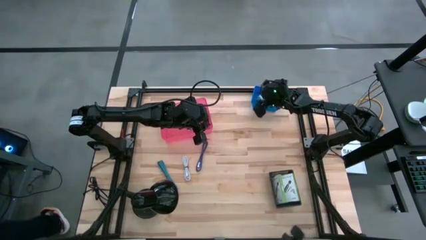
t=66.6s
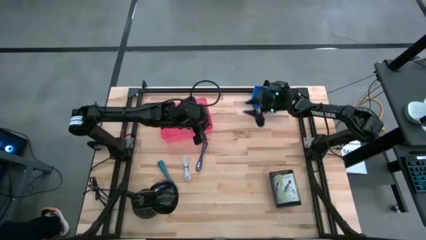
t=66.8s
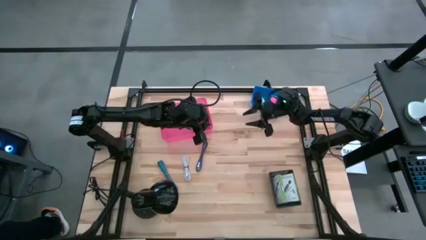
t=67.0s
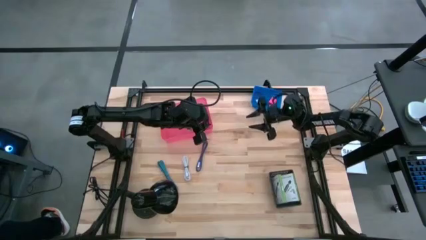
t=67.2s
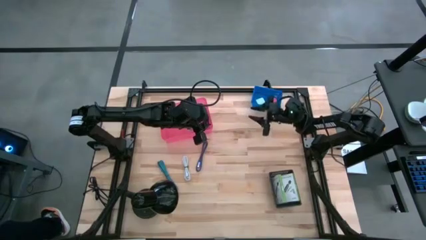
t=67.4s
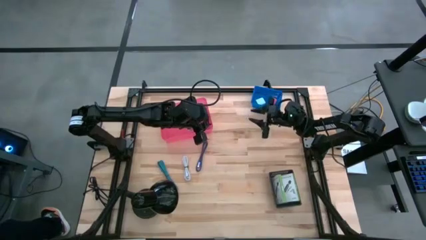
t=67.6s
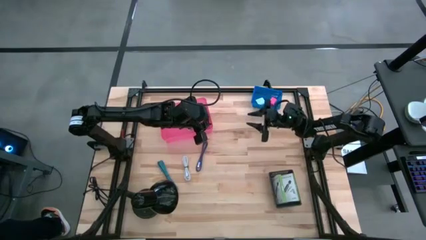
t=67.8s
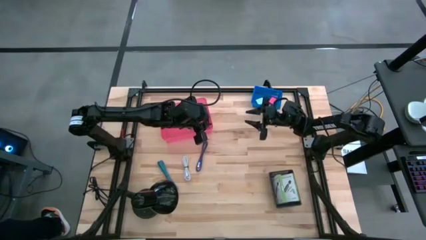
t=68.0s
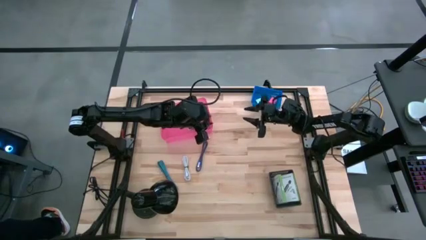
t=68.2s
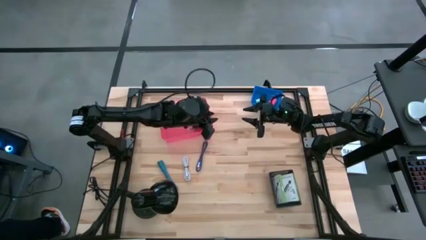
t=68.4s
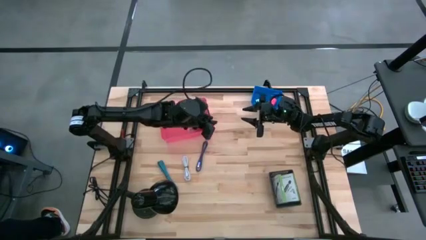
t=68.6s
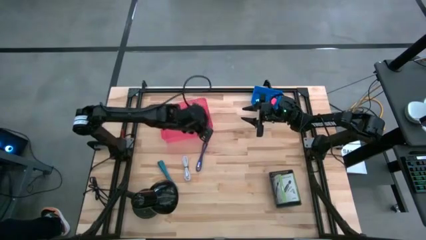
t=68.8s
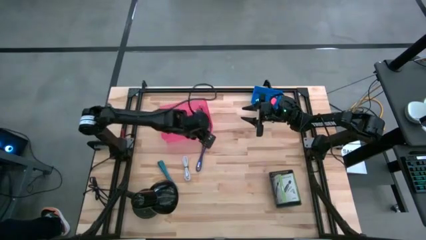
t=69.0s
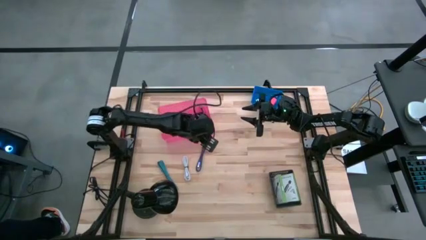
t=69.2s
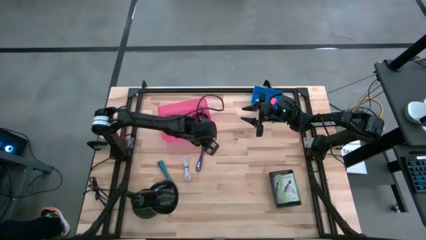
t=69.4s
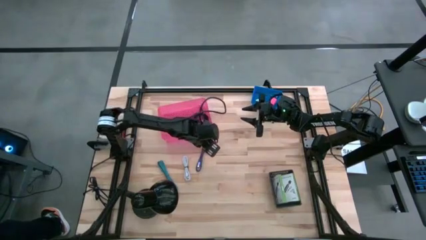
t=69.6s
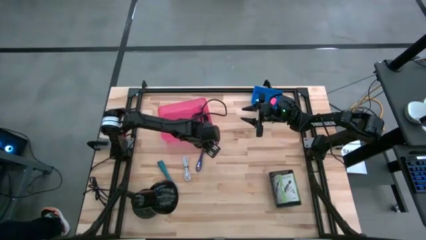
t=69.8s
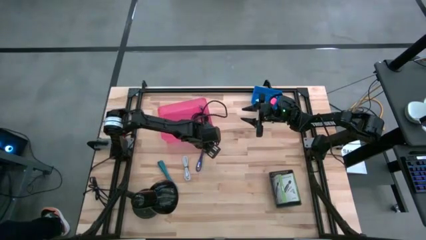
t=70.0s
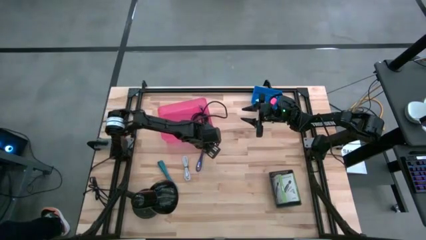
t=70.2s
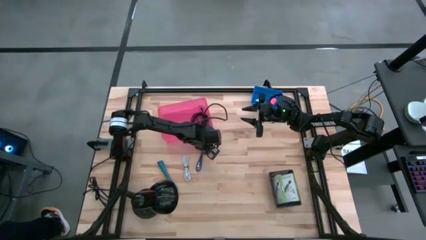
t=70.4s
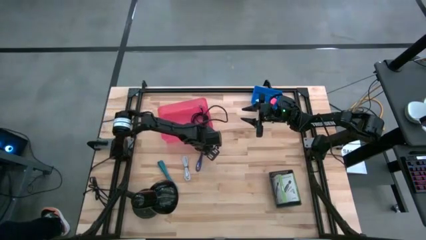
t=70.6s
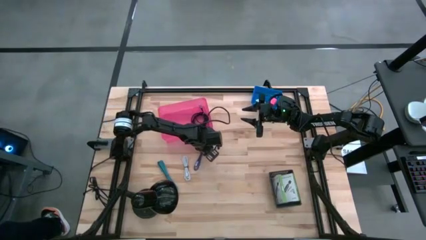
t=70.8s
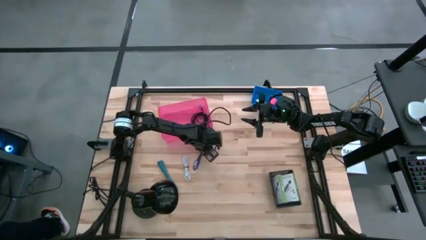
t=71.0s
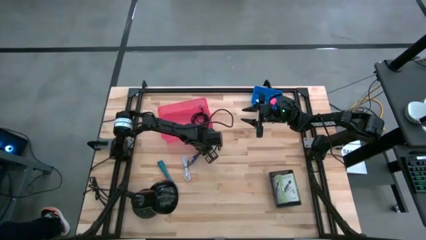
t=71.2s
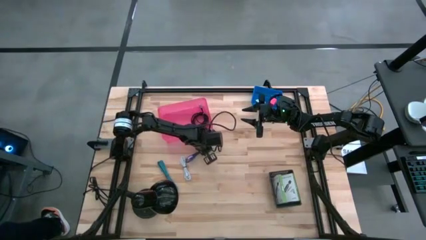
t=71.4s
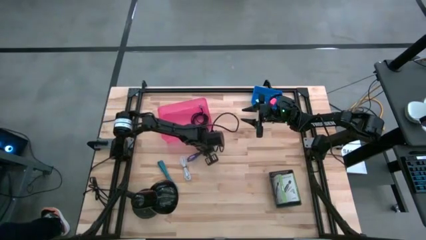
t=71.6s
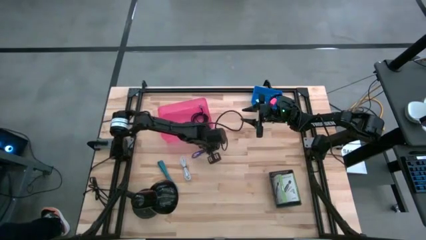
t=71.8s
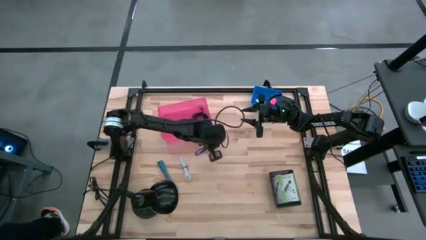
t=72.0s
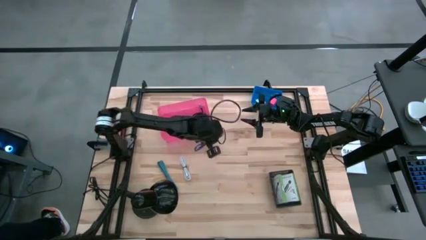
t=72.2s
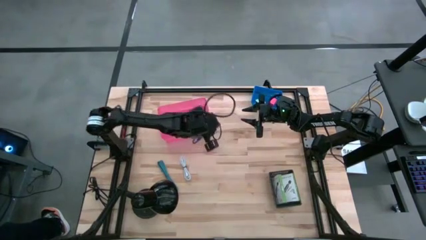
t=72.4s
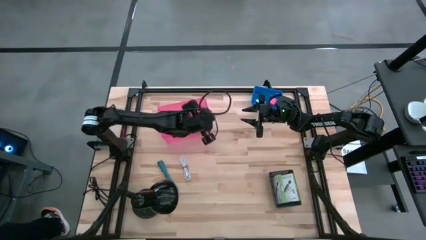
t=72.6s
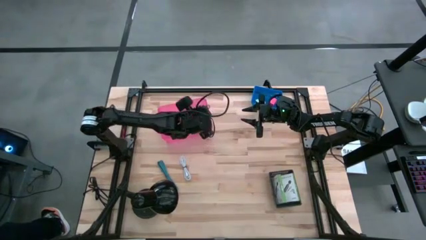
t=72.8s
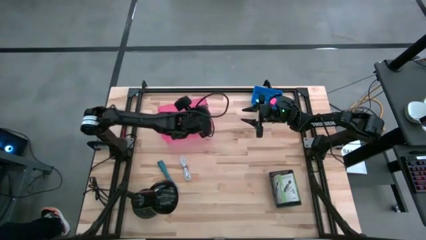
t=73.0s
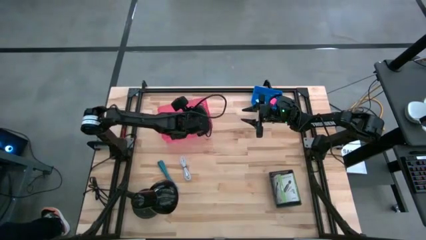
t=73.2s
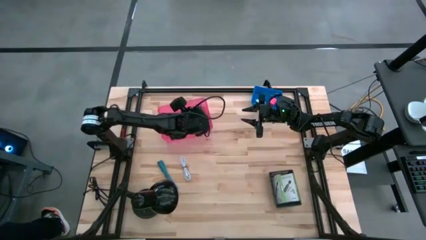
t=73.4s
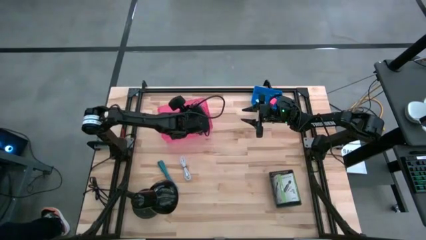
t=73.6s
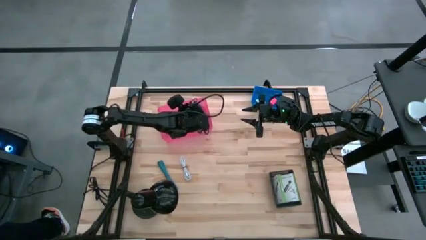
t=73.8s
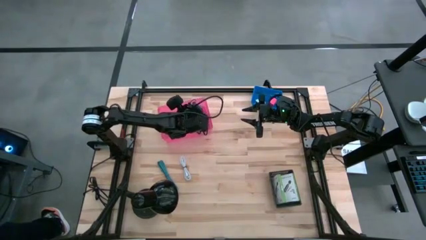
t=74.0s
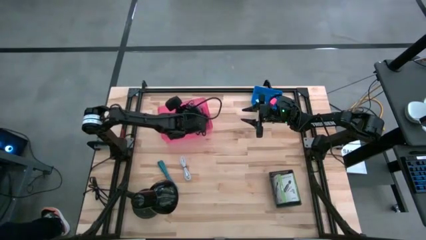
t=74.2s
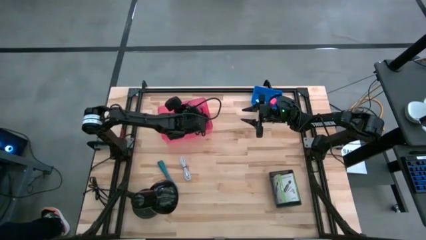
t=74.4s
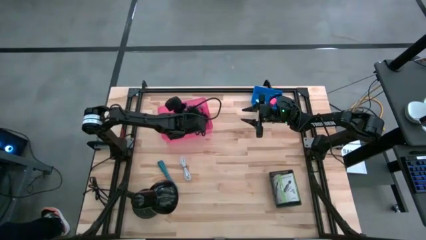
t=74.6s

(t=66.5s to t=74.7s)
Task: Pick and place items into bin
Put the violet cable wire into the pink bin

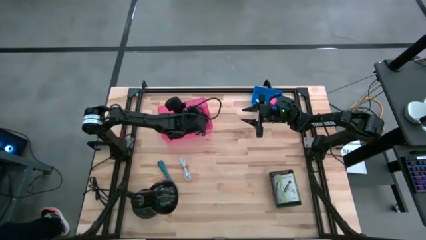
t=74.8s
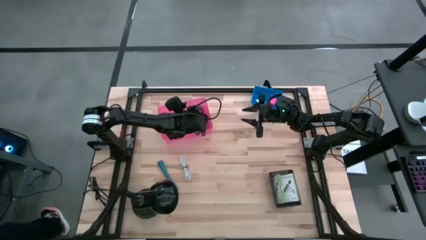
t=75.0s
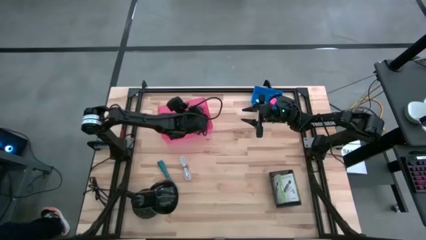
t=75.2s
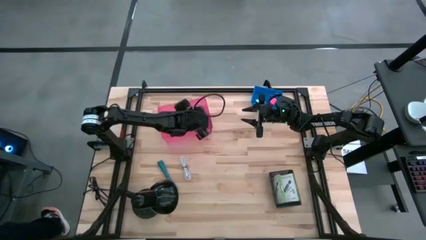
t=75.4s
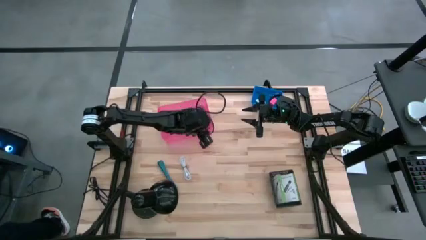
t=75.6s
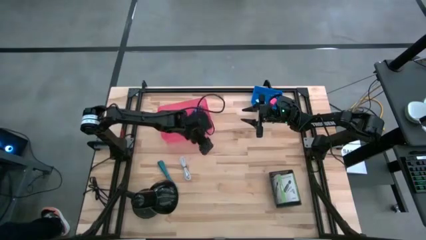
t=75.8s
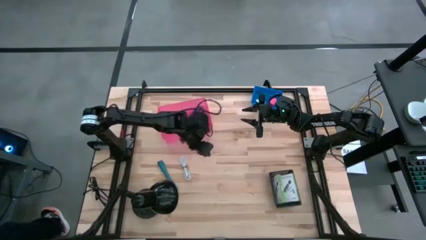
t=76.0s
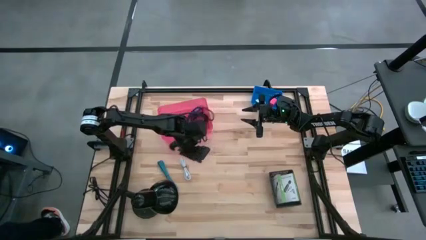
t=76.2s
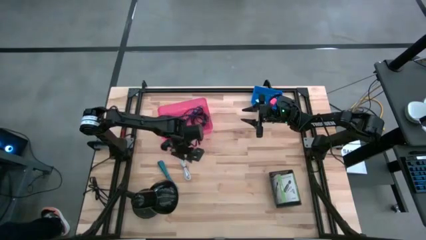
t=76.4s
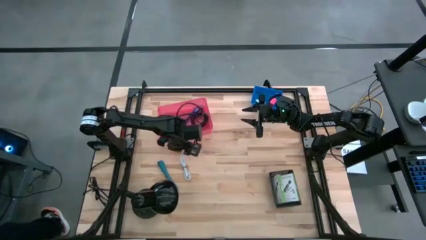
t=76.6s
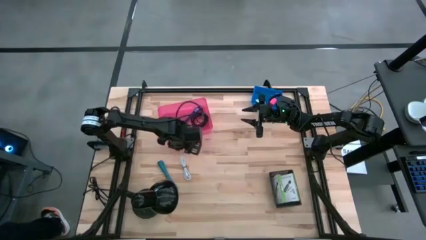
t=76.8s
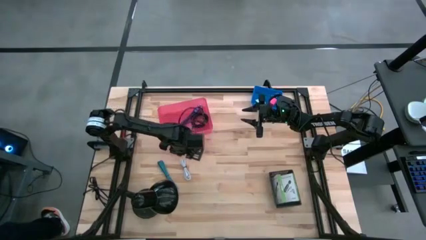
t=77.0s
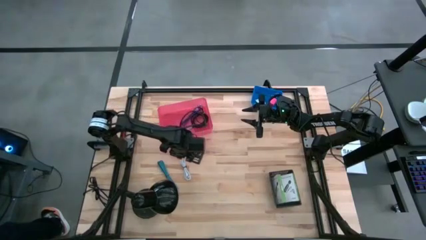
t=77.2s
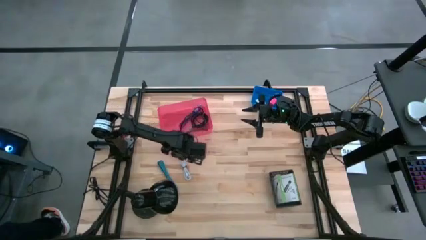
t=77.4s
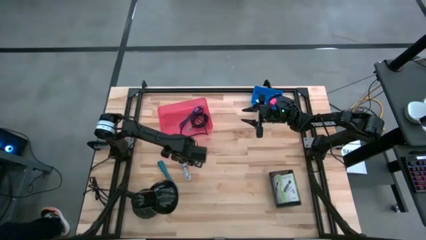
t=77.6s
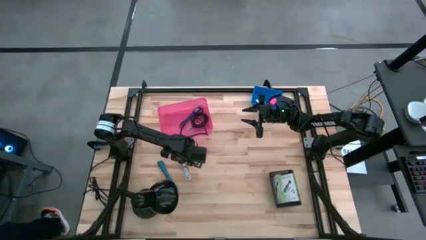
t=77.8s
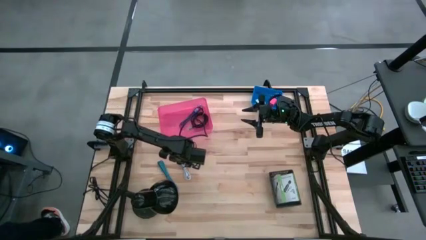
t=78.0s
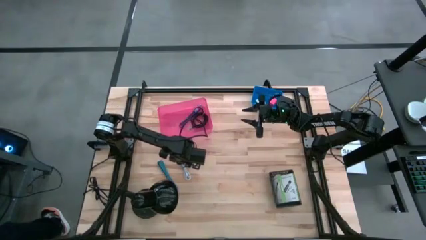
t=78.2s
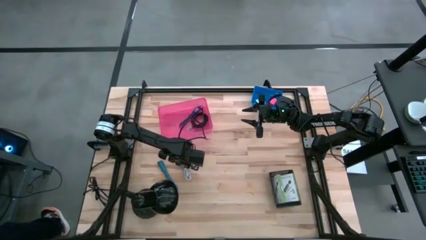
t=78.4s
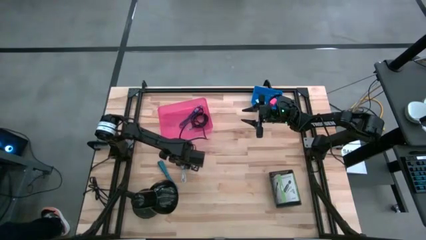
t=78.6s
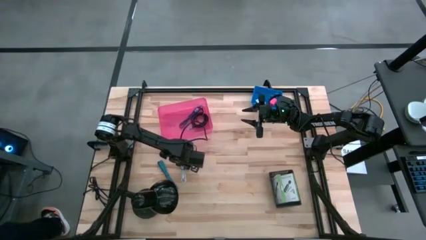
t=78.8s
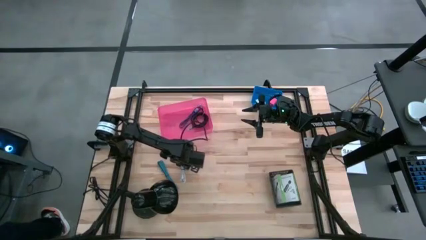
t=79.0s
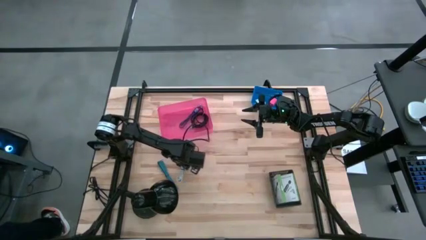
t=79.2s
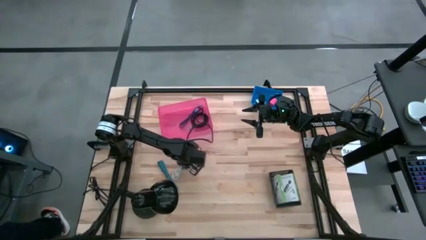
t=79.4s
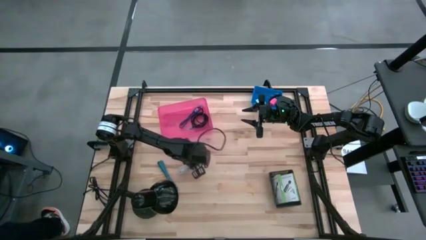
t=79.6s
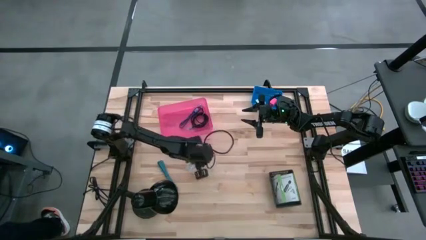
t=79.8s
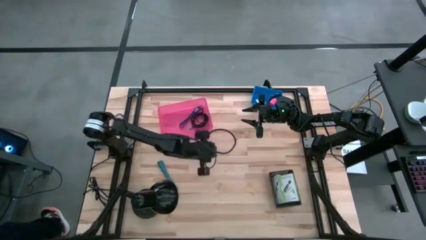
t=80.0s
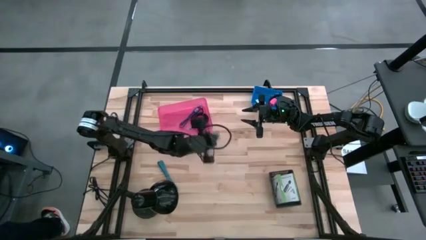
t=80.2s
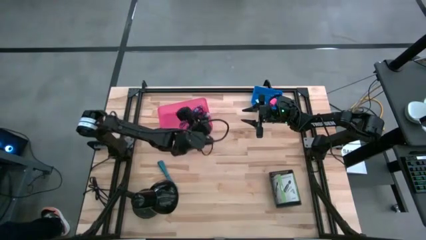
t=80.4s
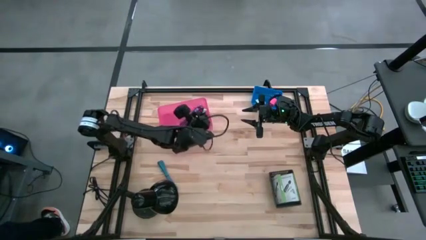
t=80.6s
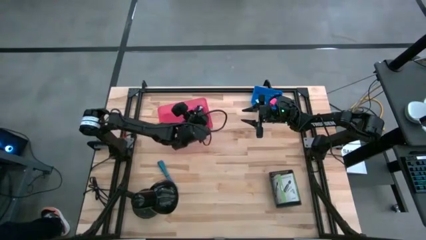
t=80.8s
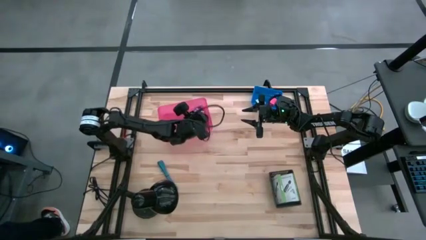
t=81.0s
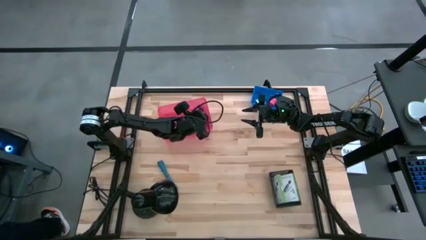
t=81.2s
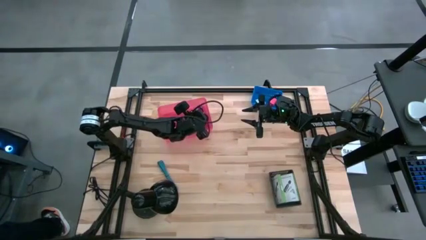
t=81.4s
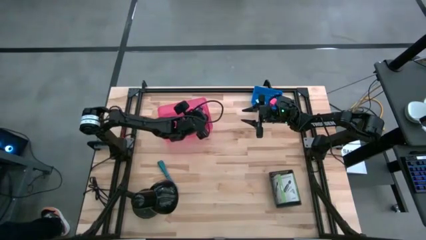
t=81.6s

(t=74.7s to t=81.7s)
Put the white cable wire into the pink bin
